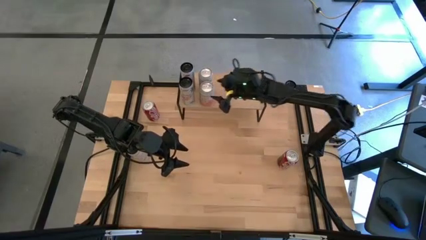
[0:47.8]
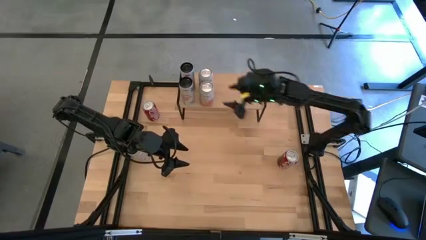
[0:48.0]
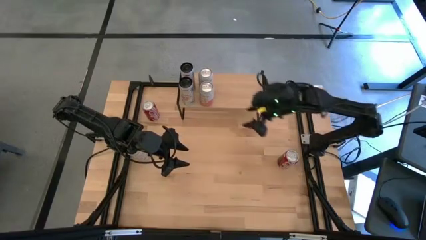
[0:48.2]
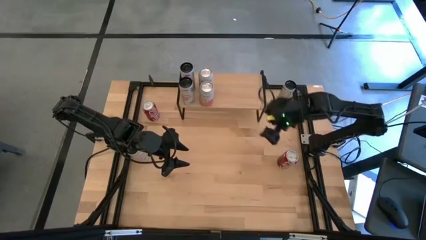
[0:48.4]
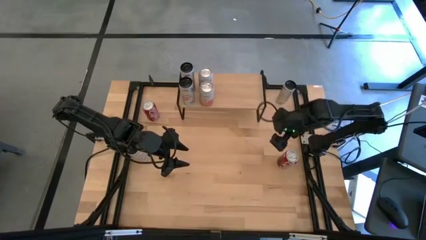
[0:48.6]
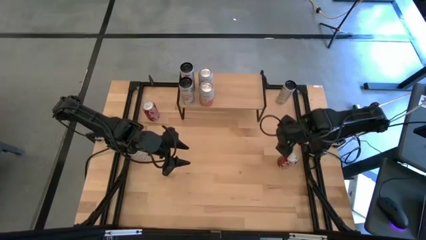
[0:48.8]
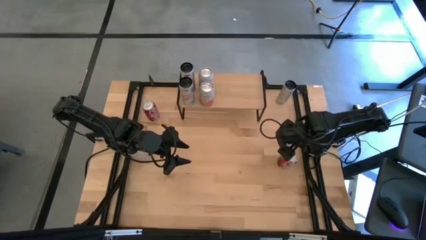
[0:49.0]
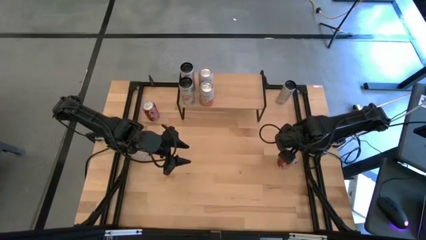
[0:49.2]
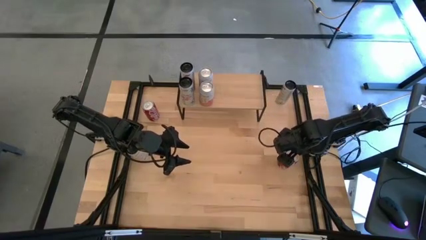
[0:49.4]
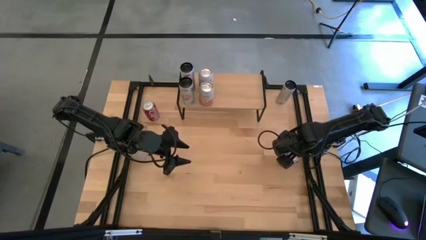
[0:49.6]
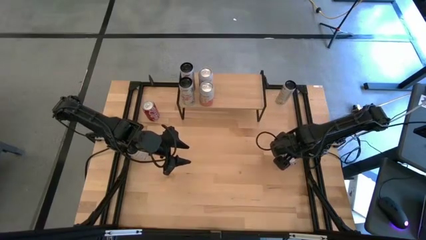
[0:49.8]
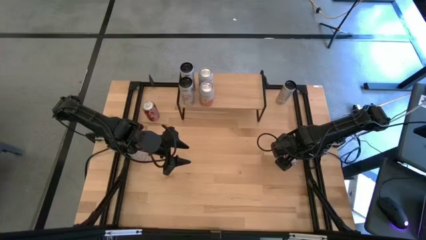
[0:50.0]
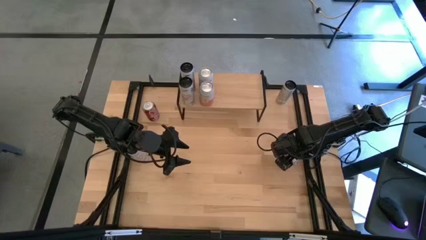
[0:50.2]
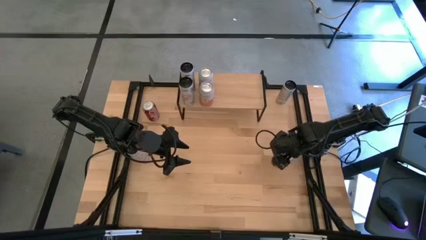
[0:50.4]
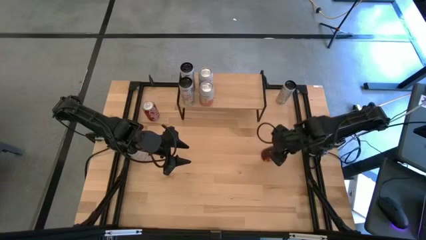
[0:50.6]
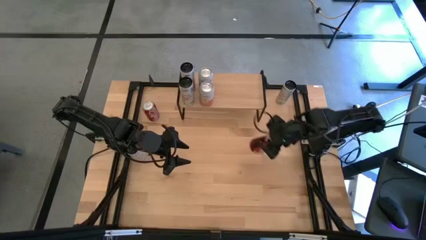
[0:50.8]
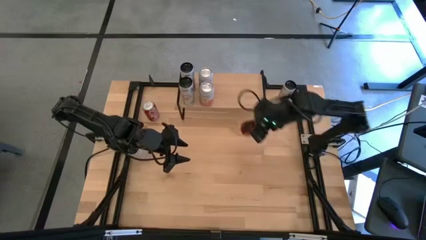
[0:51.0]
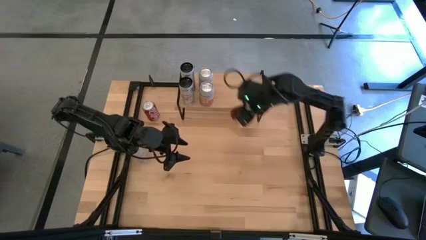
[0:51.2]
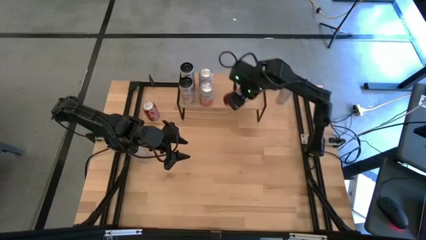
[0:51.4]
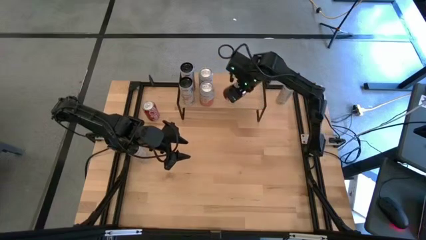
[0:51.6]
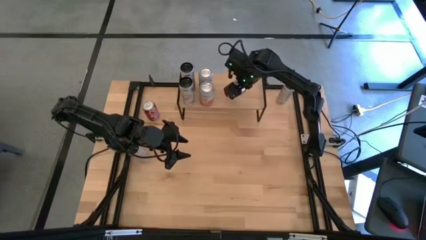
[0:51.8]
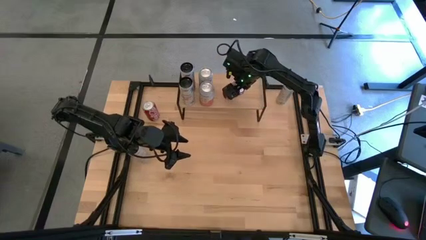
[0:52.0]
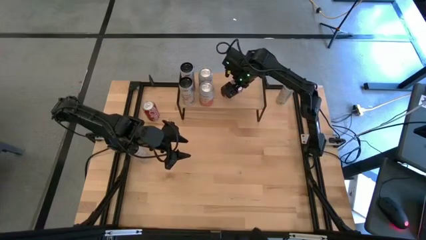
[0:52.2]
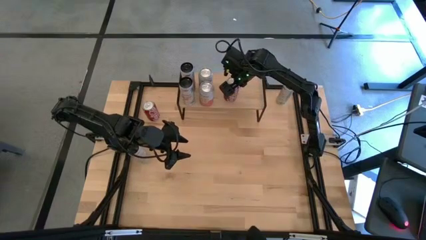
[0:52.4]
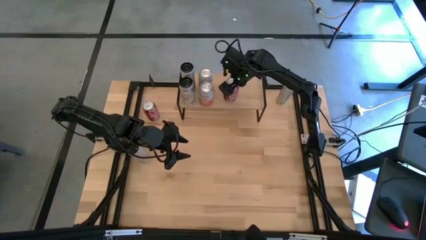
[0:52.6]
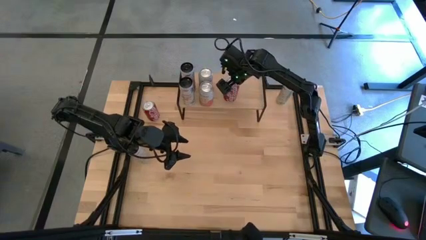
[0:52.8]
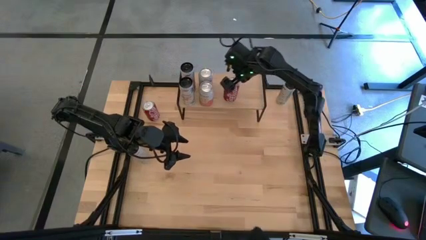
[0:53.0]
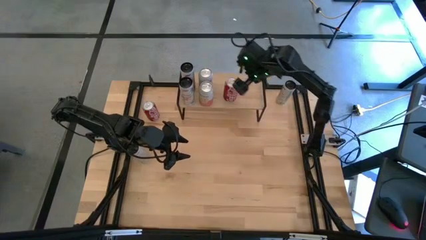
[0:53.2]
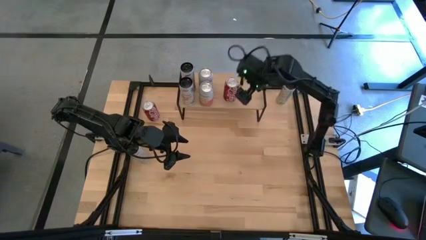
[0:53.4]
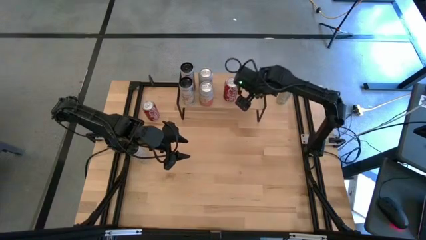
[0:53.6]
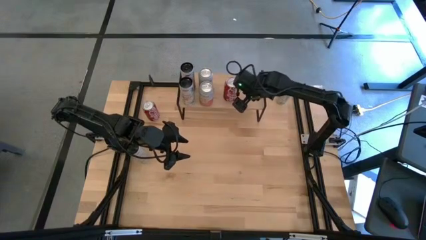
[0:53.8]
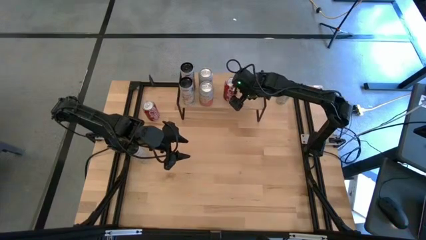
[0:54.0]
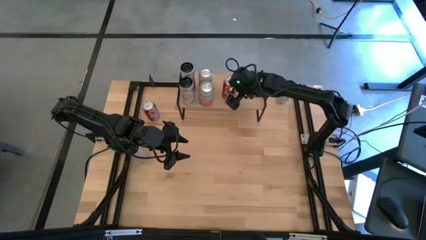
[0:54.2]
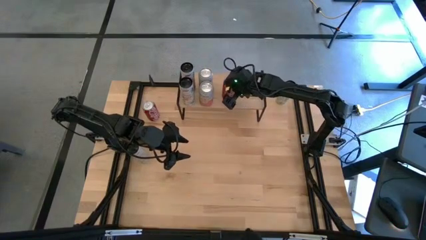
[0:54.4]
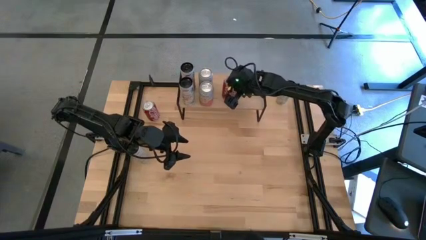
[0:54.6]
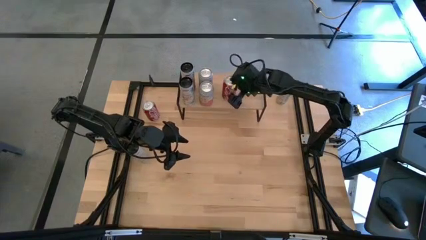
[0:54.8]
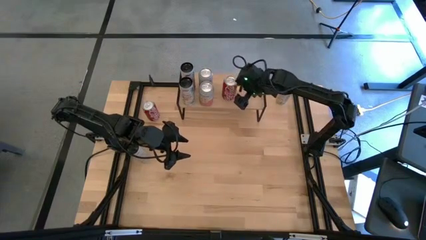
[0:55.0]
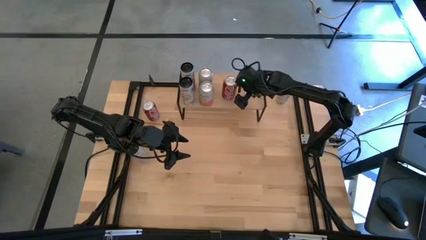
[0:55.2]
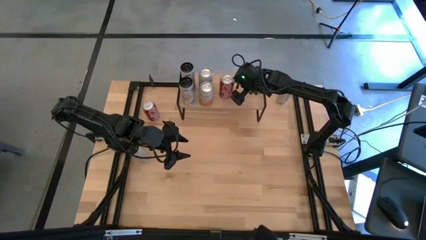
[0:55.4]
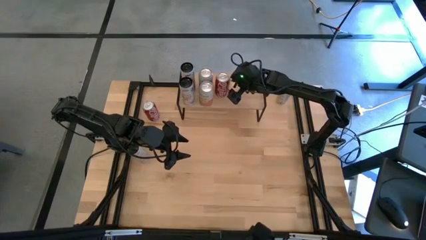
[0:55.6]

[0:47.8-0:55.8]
Task: Place canned beverage on shelf
Put the bottom red soda can on the shelf

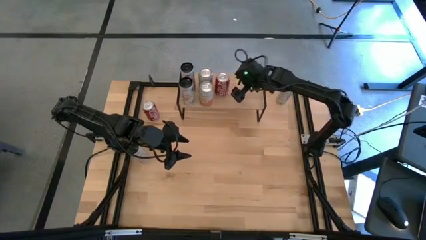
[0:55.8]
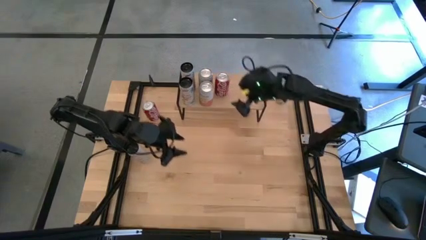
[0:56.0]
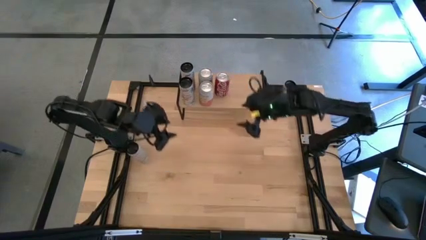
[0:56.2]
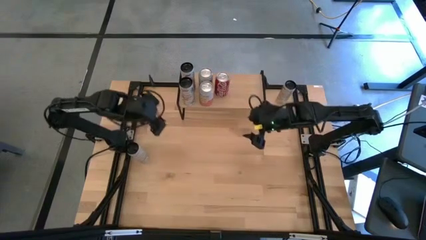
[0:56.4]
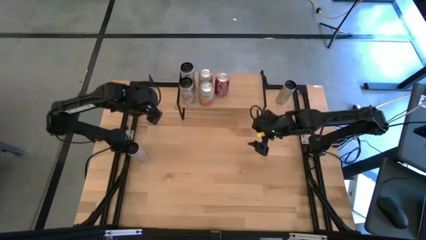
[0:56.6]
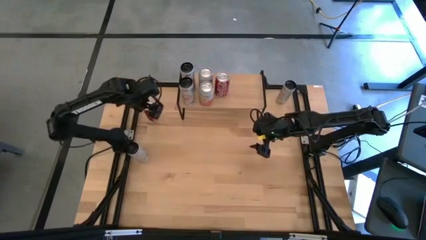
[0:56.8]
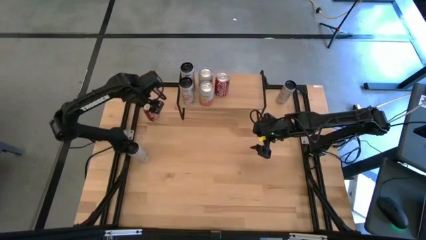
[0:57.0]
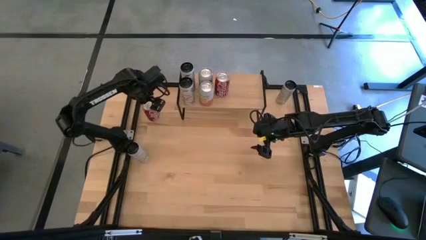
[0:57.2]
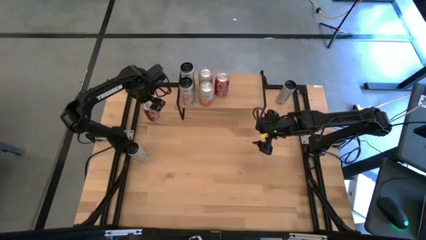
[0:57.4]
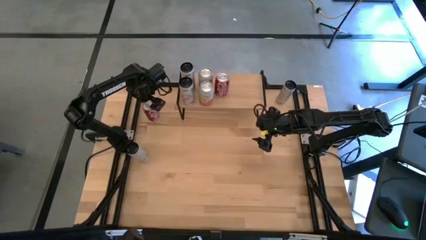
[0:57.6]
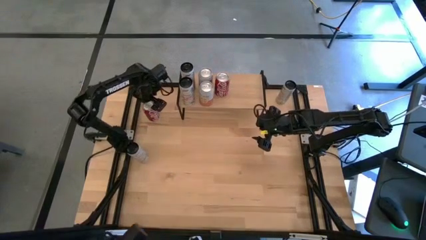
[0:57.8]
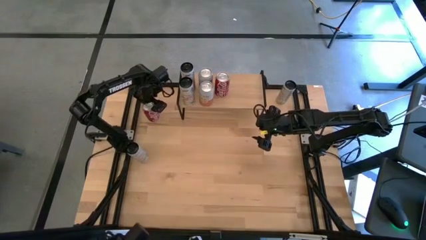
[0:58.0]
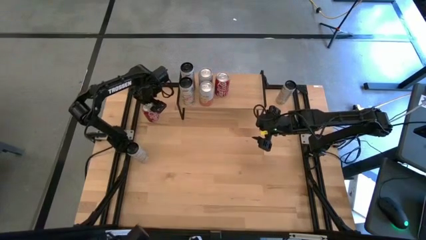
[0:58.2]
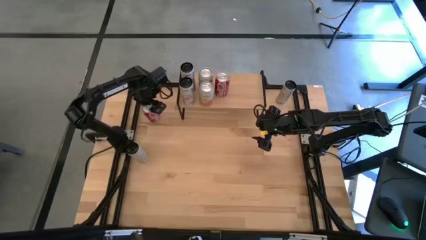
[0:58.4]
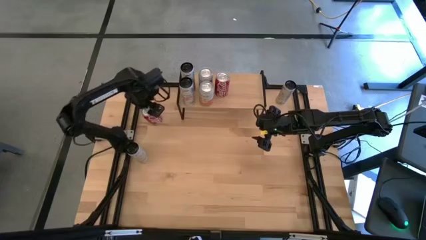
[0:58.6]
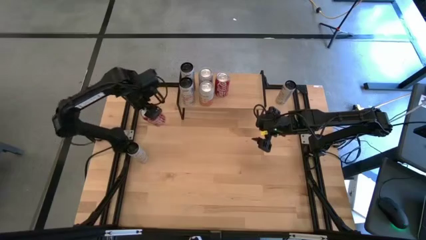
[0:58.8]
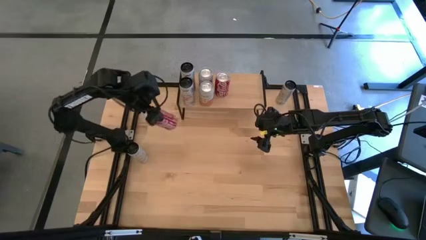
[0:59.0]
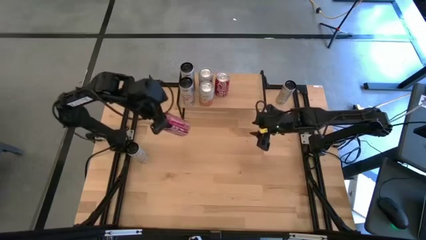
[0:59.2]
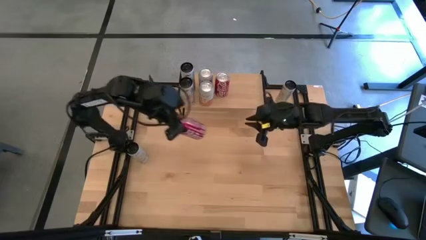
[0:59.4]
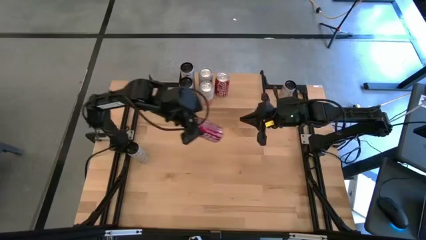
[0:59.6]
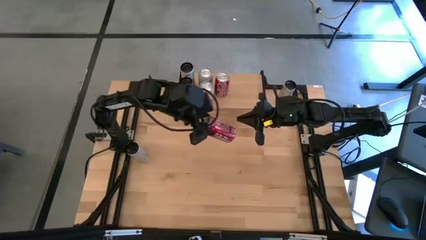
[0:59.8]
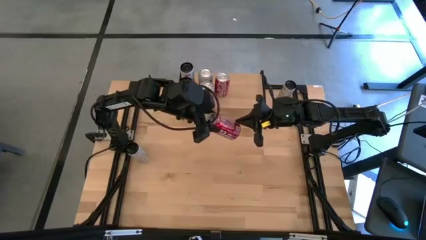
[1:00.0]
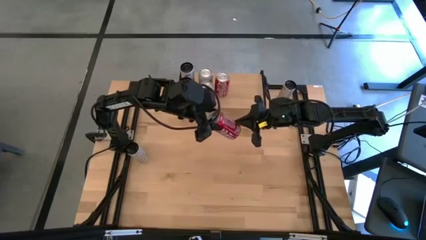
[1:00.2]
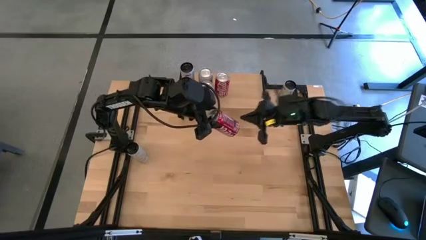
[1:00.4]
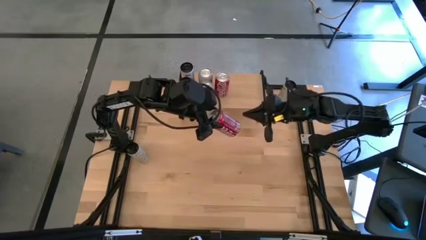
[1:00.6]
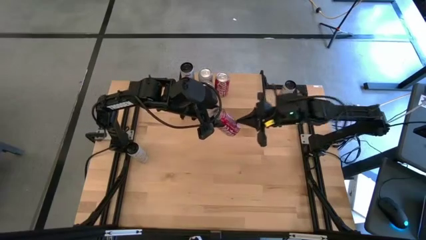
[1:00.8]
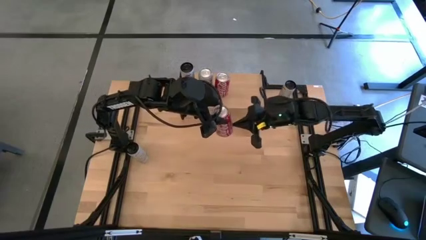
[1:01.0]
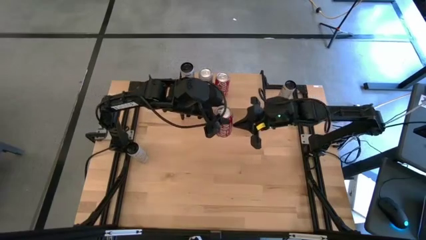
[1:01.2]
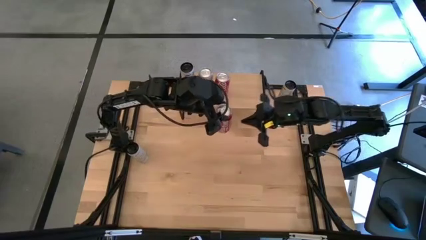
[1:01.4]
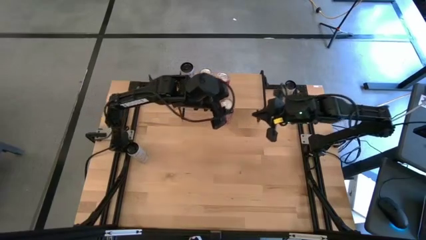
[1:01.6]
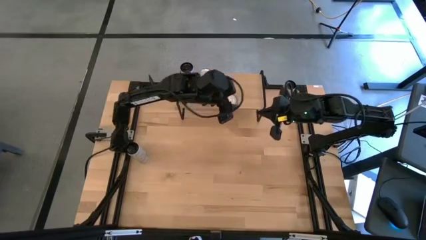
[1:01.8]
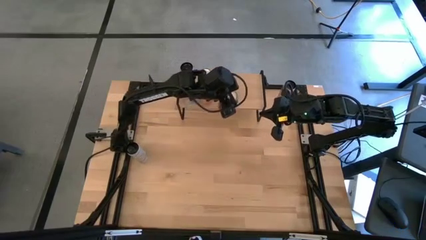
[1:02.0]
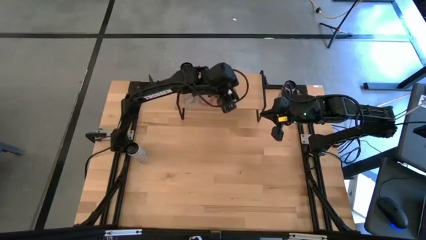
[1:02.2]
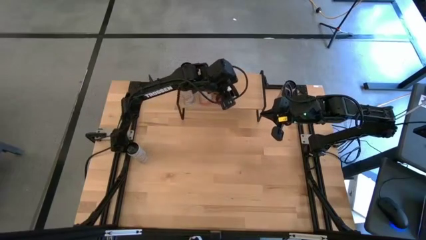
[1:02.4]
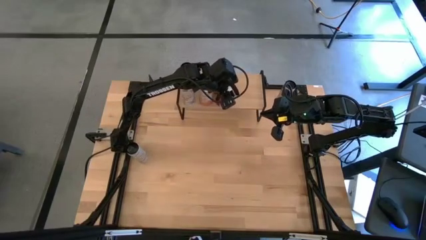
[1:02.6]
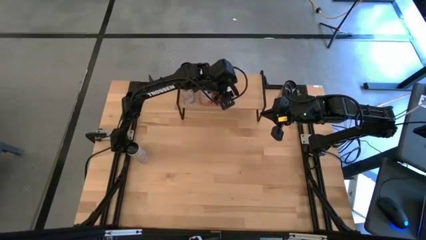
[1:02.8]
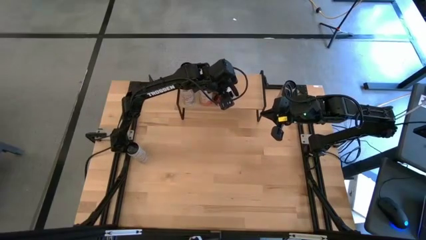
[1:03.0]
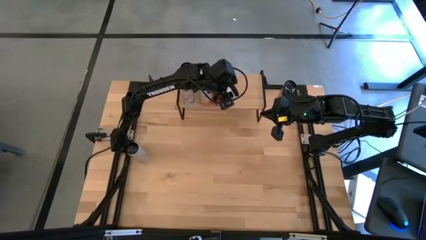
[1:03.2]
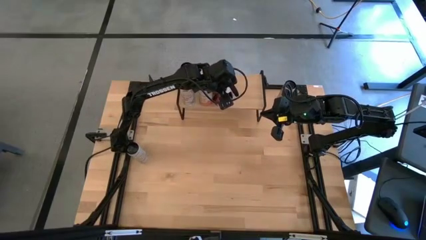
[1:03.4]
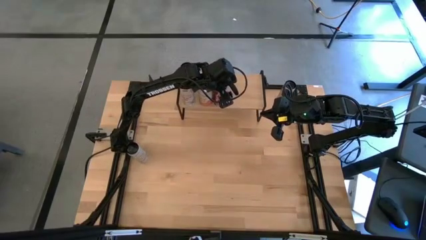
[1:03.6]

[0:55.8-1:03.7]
Put the red soda can aligned with the other red soda can on the shelf

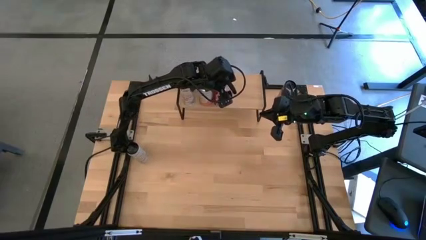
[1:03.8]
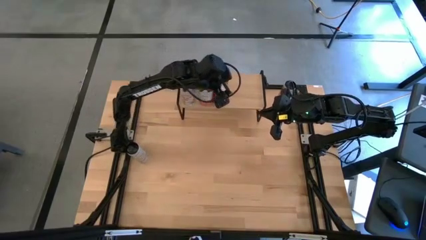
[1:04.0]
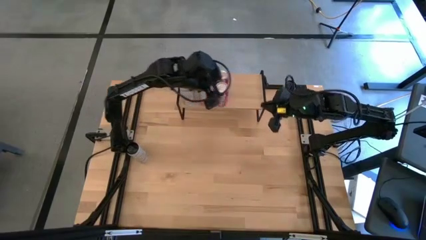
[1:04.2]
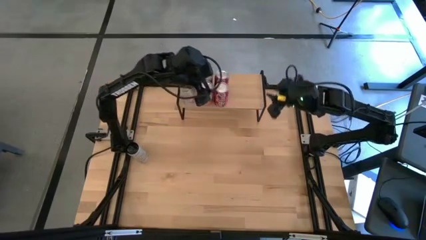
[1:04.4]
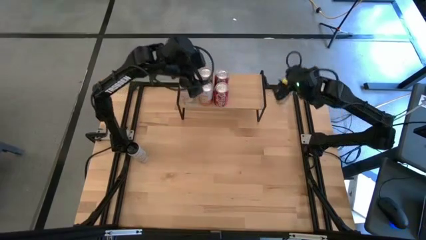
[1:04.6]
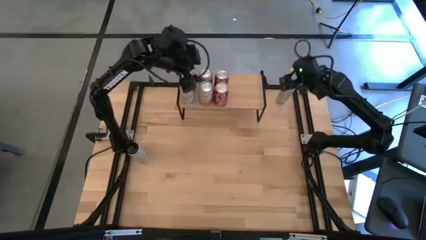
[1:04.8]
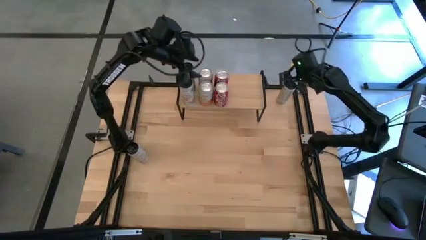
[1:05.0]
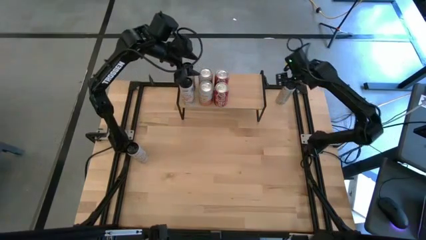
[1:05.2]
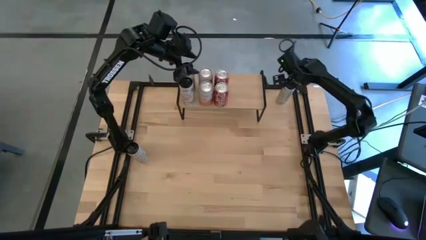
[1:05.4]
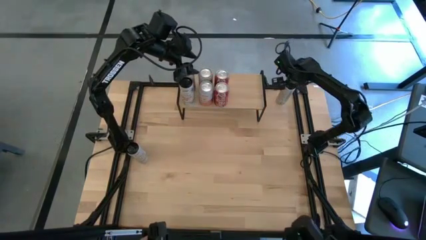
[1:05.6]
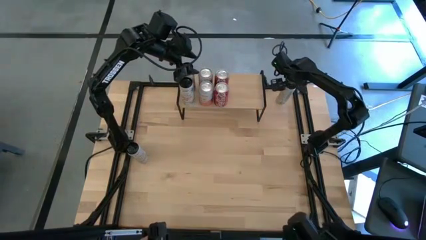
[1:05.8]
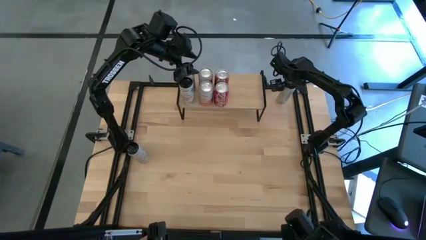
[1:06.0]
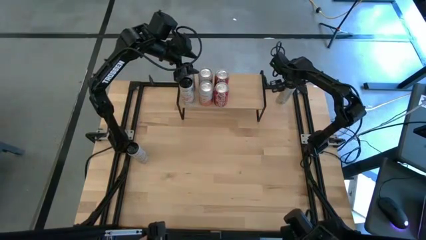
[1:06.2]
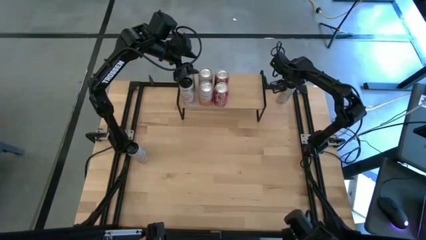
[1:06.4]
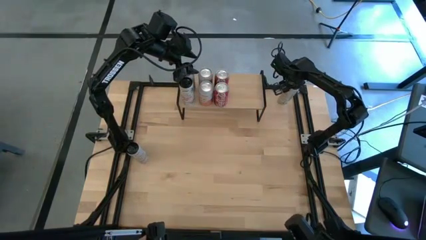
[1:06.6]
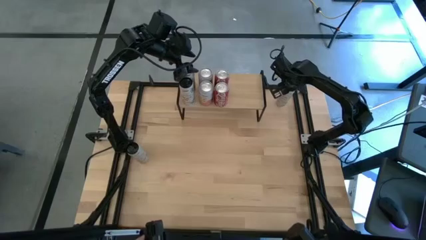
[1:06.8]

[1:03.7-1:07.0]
Put the white soda can on the shelf
